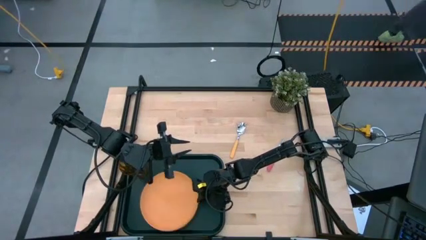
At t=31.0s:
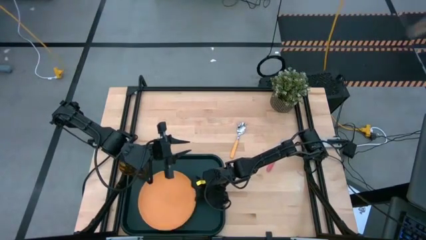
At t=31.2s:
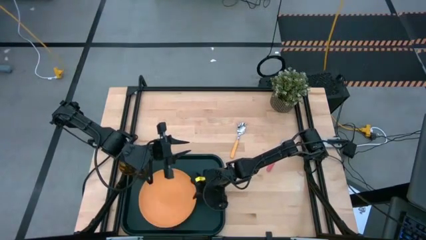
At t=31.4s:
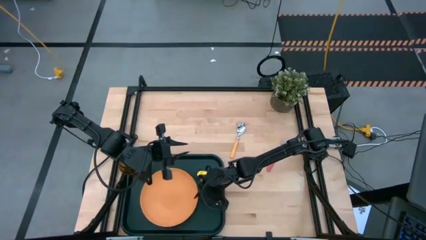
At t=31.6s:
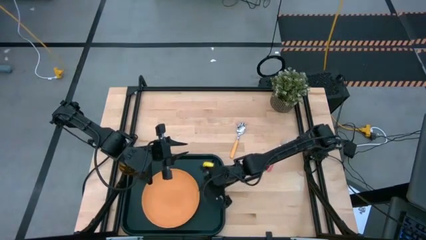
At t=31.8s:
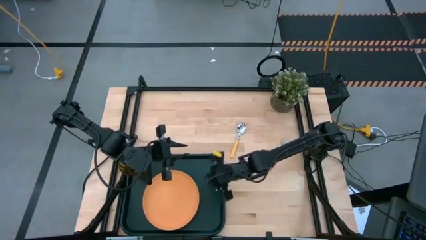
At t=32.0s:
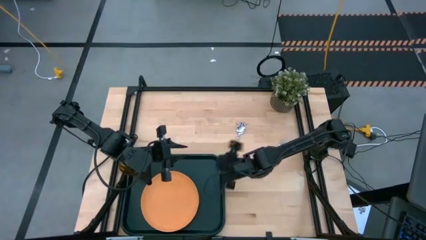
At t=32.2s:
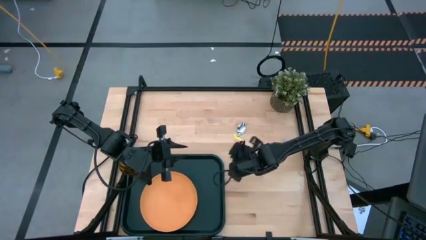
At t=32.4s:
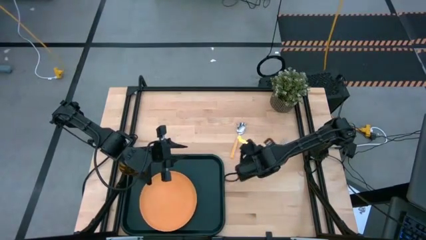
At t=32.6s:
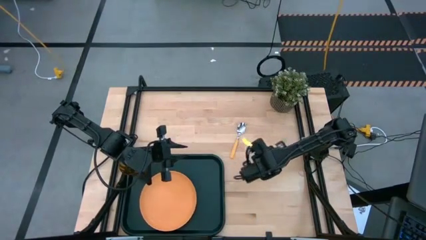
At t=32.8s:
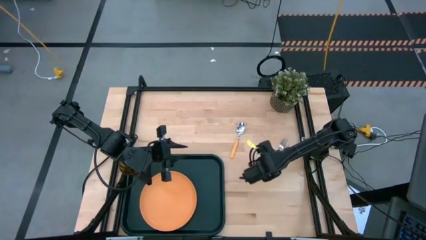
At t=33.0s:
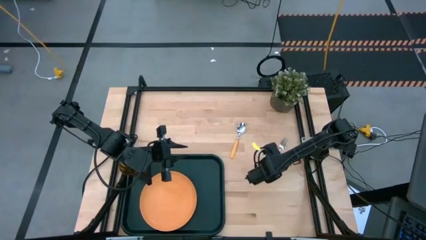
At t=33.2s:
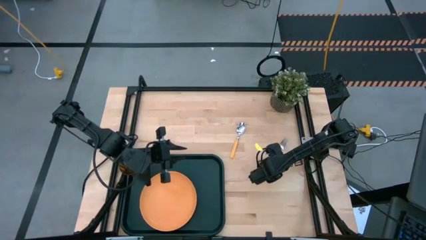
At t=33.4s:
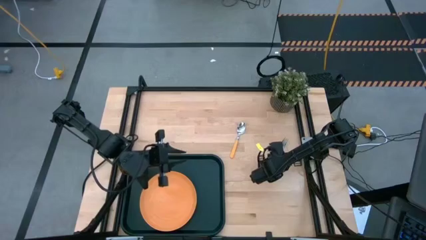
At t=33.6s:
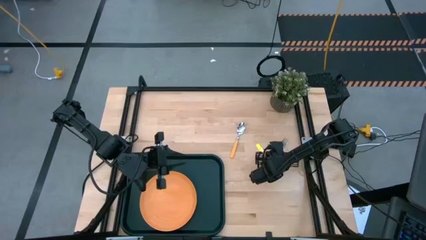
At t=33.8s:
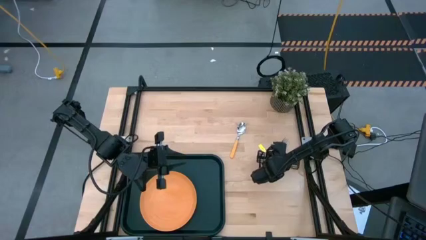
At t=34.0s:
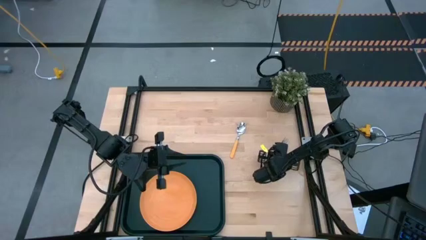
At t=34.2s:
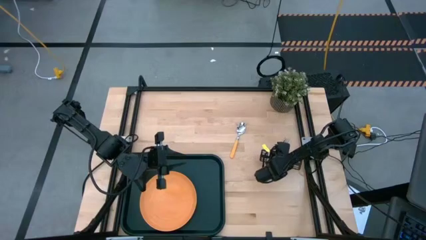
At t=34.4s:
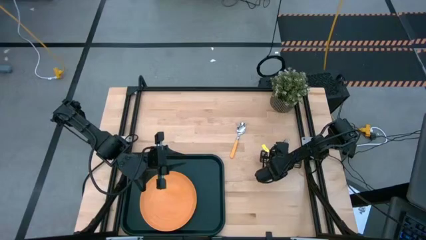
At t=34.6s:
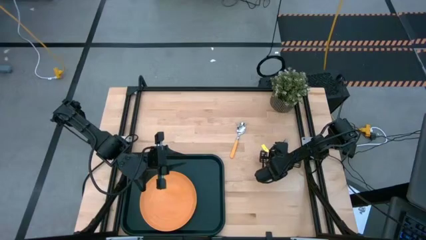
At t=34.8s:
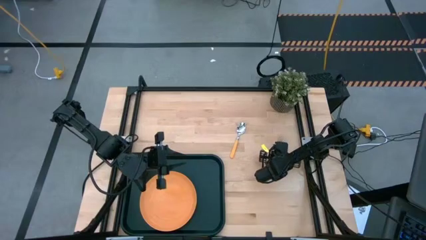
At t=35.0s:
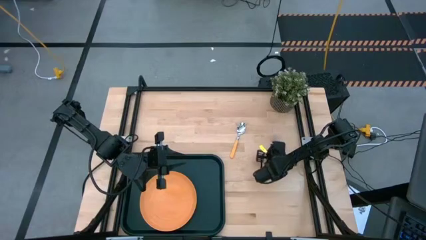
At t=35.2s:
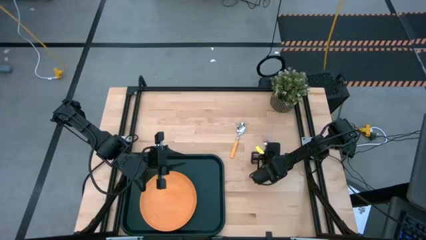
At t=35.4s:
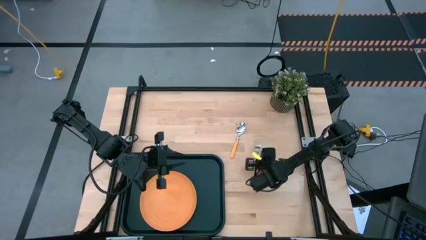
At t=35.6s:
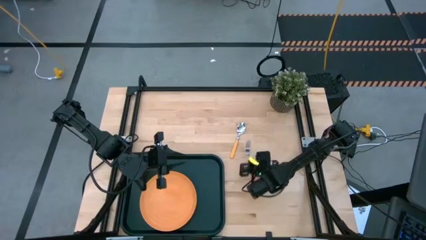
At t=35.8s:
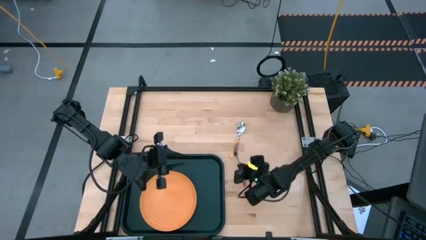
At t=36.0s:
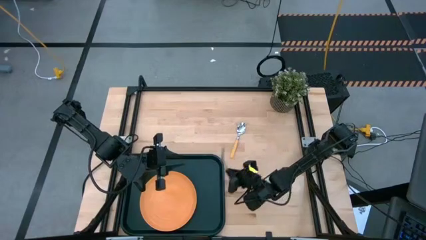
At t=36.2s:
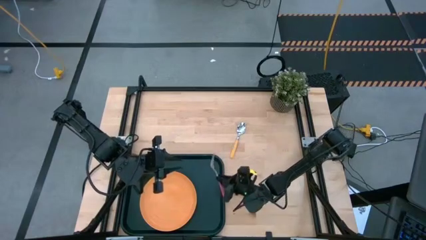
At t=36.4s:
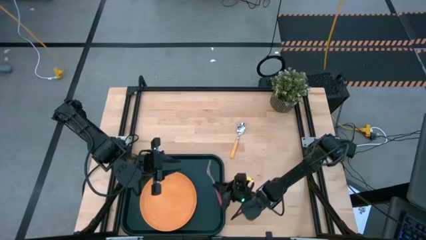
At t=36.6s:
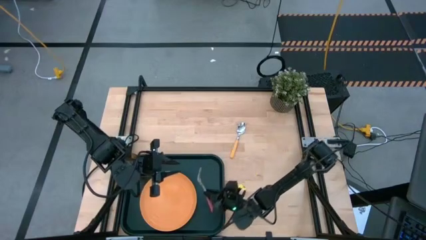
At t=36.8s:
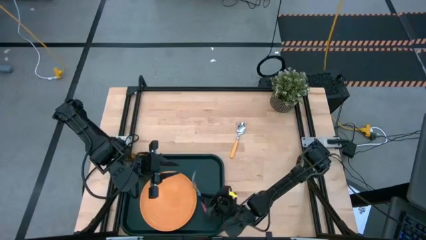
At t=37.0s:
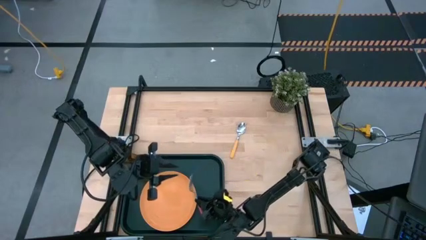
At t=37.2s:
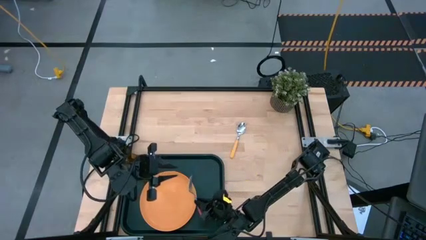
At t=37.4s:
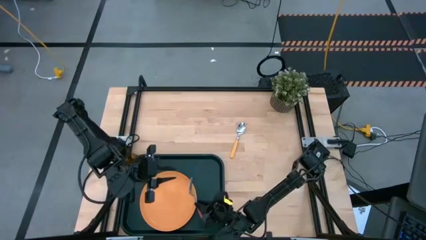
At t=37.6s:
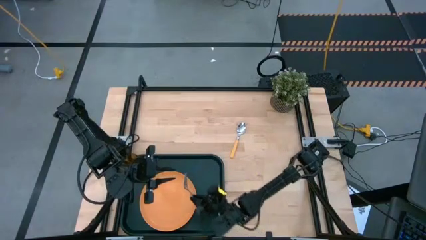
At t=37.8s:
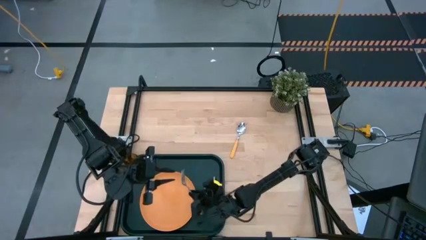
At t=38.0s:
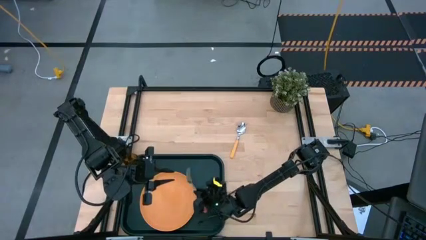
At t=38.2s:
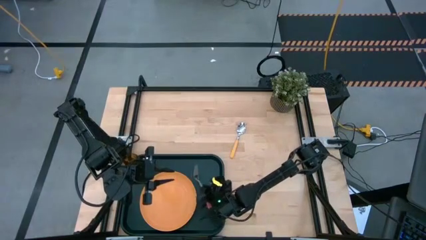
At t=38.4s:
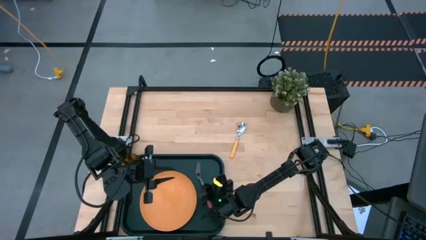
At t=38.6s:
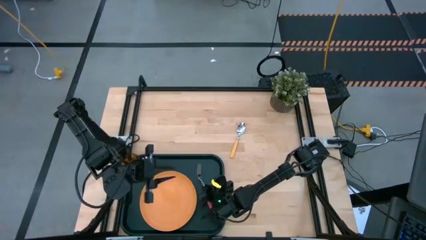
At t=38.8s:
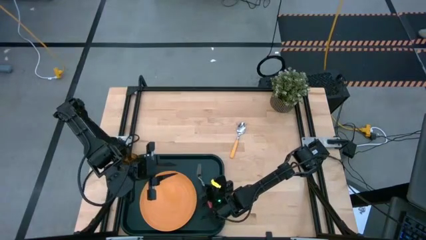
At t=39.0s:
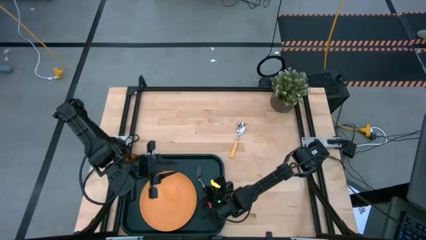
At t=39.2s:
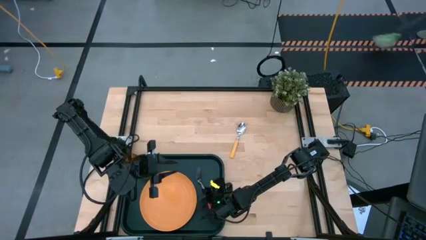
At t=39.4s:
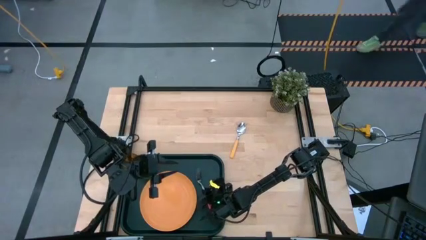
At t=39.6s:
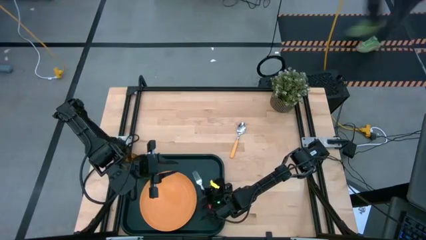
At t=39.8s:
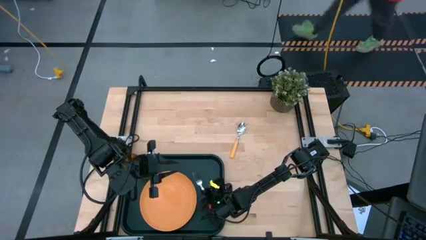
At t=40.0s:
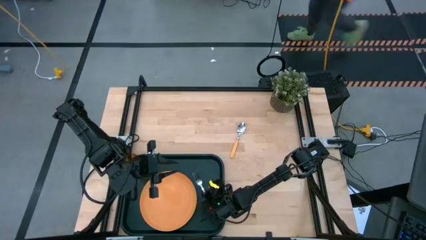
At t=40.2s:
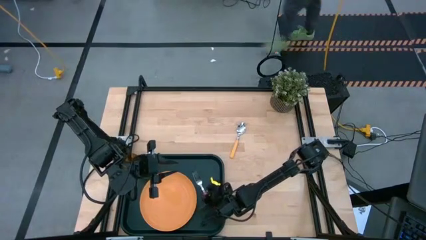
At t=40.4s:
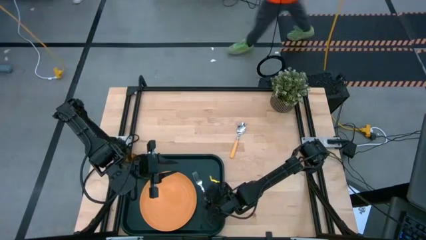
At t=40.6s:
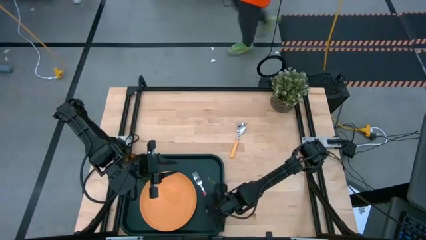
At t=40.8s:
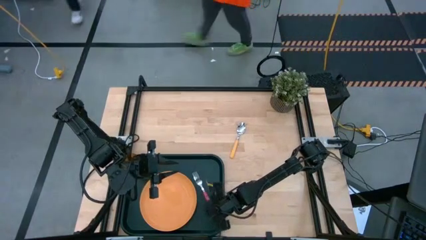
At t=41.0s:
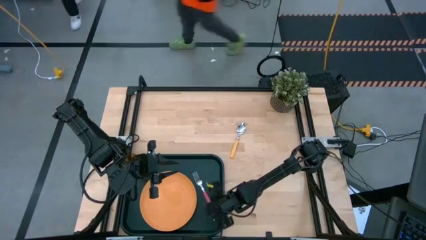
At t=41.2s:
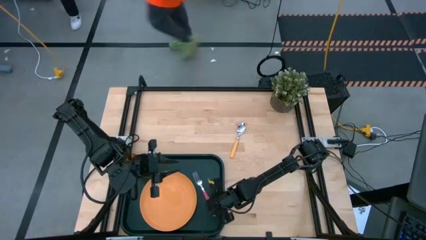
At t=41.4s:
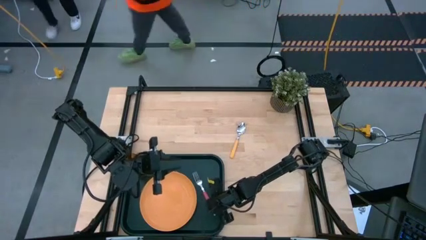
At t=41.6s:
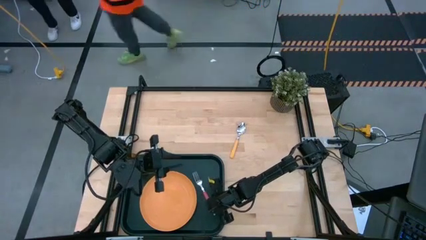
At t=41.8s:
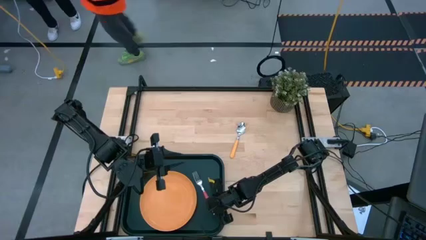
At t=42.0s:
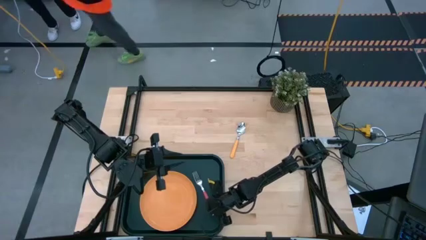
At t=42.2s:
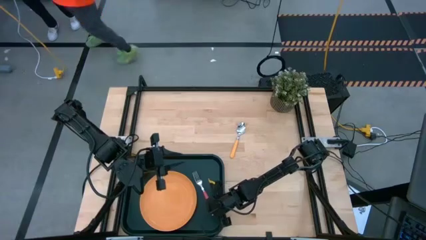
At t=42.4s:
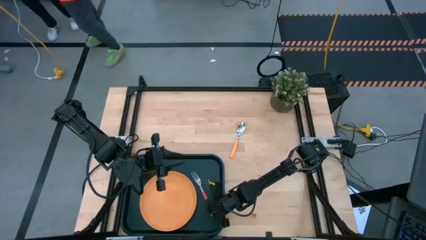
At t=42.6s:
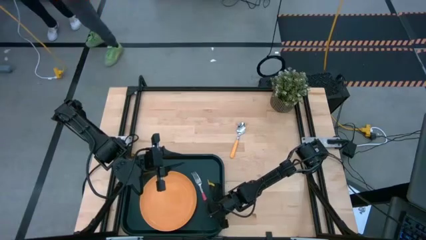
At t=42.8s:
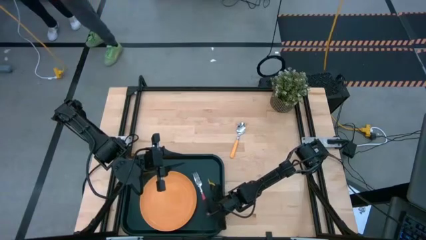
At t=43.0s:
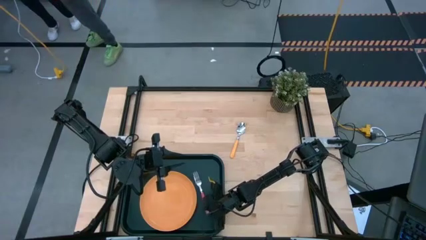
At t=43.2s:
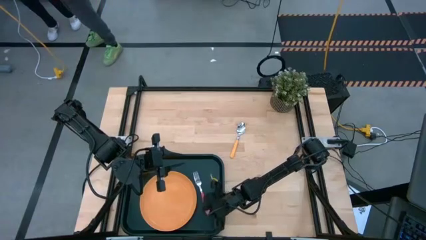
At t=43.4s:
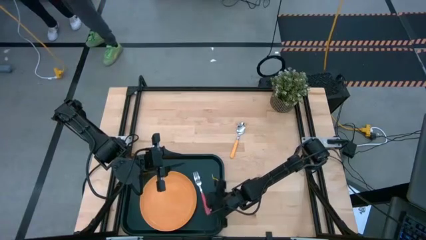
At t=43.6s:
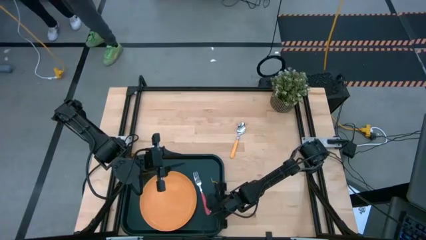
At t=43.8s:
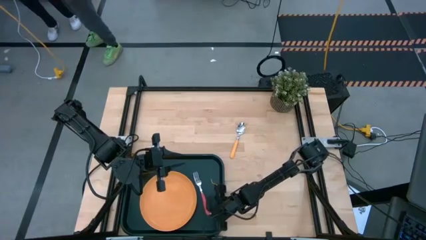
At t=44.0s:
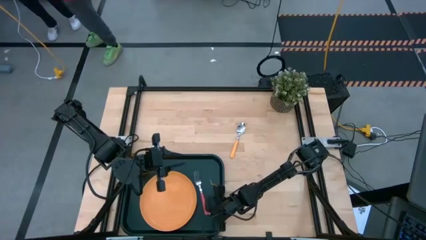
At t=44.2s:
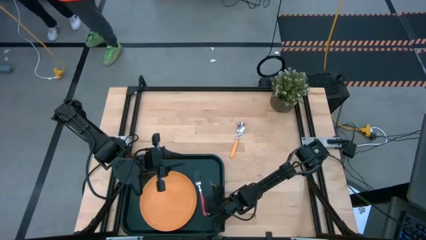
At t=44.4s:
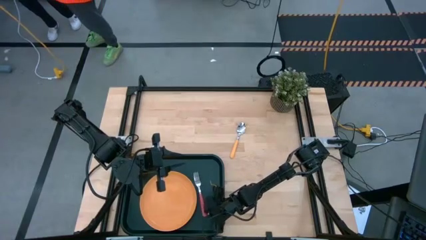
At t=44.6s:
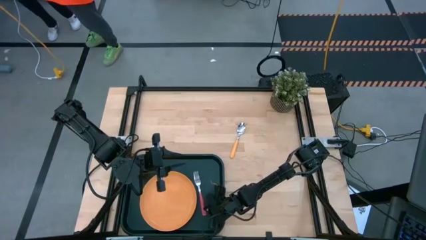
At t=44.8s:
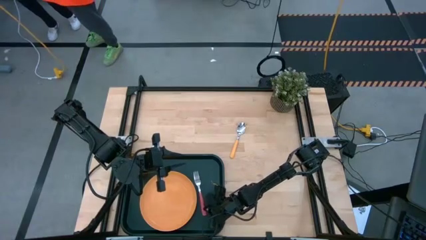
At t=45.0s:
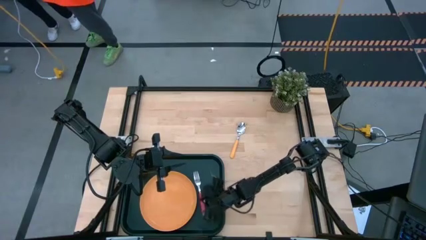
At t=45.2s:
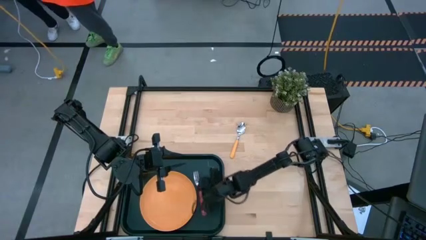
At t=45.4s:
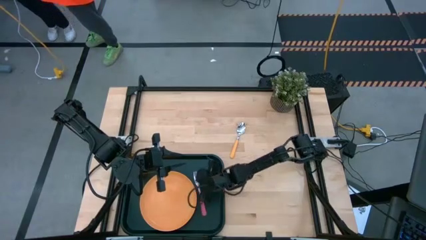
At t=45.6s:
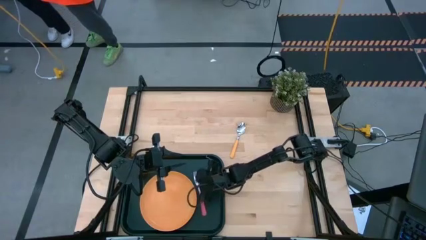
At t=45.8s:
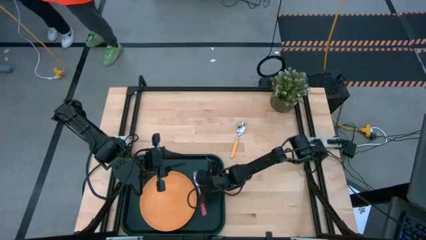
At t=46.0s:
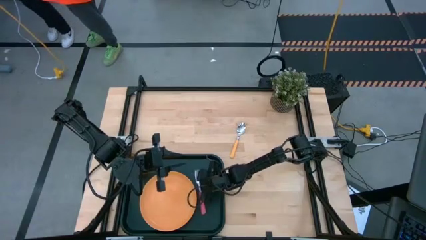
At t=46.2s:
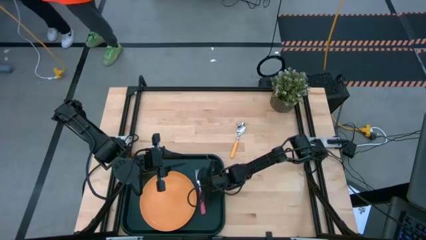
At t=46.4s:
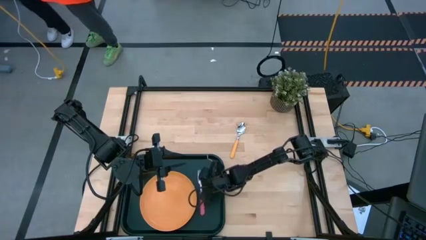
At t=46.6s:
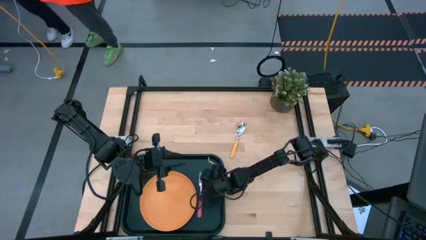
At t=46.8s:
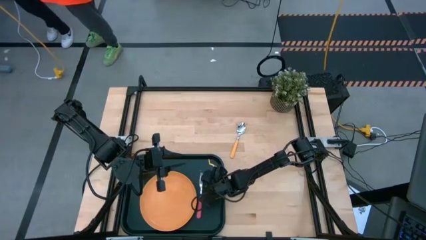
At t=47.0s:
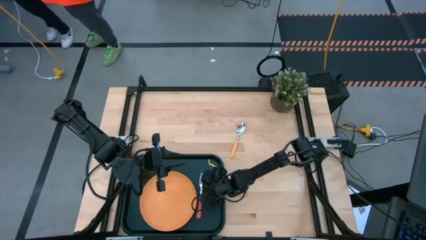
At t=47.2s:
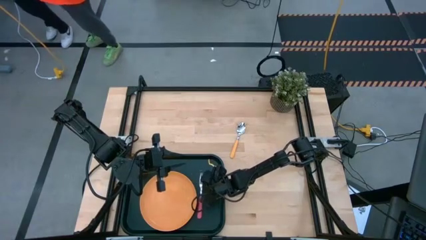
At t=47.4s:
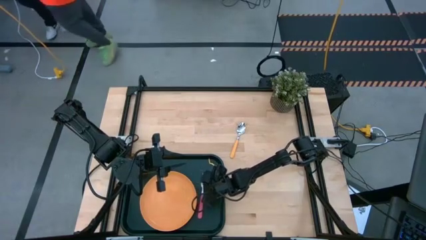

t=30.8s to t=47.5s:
Task: Pick and place plate/cup/fork/spoon on tray
Put the pink fork on the black tray to the right of the orange plate

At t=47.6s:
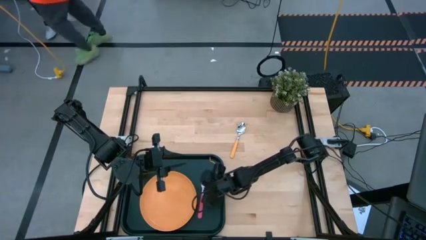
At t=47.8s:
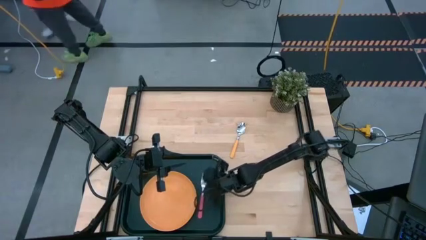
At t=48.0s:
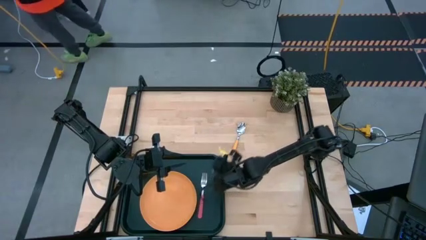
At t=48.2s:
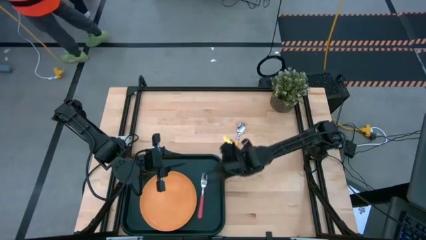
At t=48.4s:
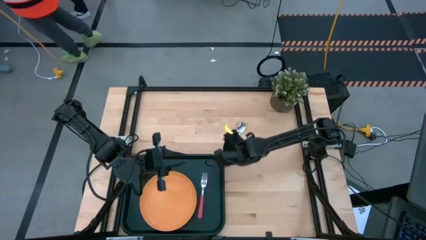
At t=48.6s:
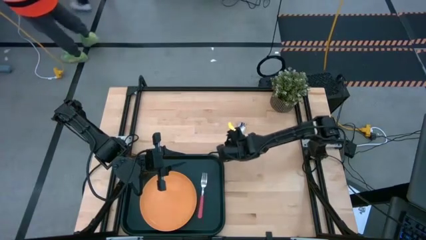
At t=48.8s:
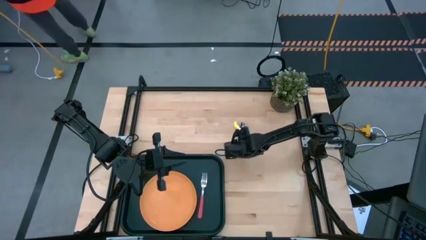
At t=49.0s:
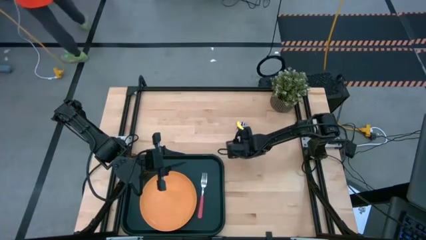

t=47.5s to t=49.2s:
Put the orange spoon on the black tray to the right of the pink fork
